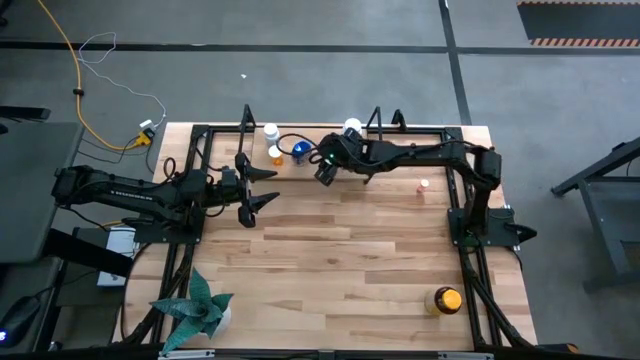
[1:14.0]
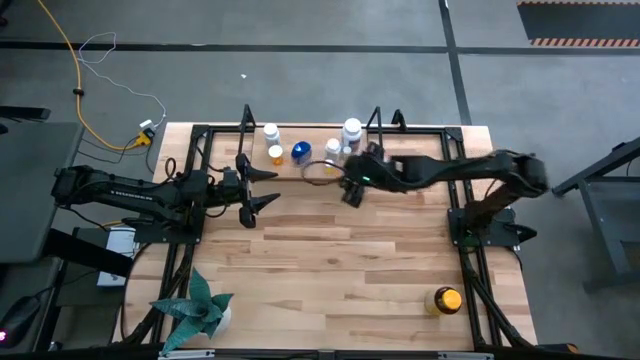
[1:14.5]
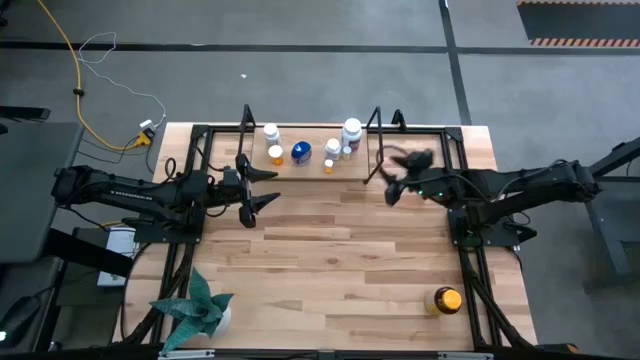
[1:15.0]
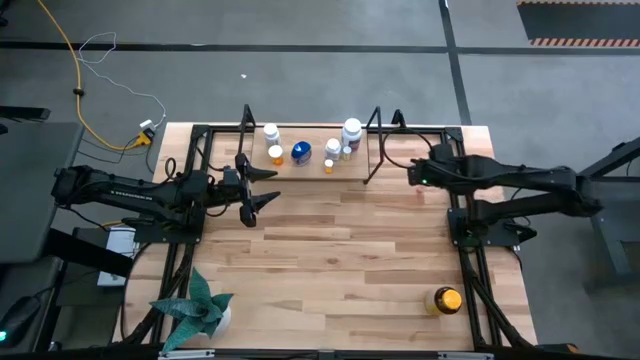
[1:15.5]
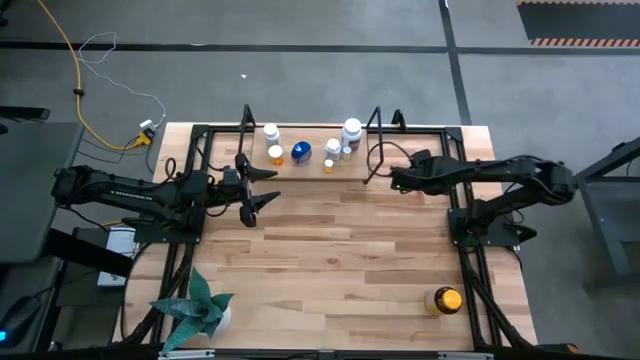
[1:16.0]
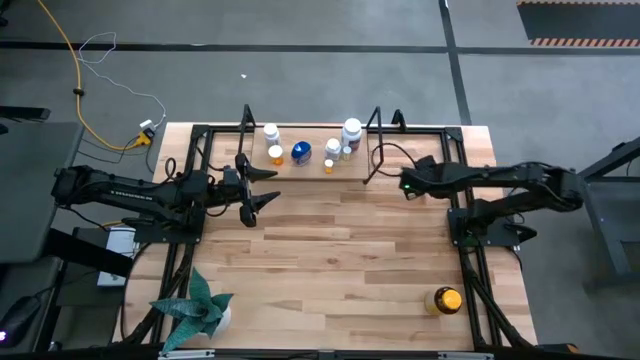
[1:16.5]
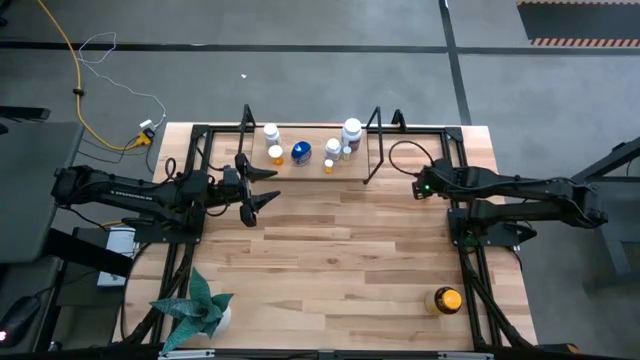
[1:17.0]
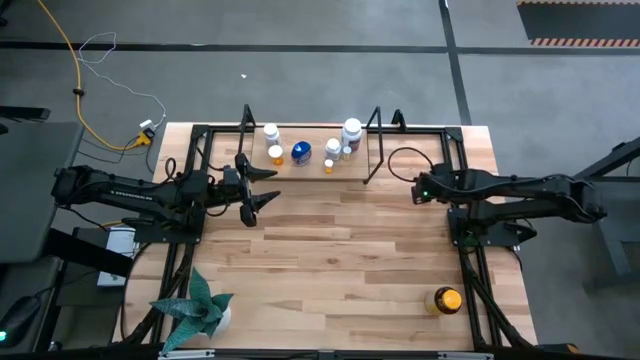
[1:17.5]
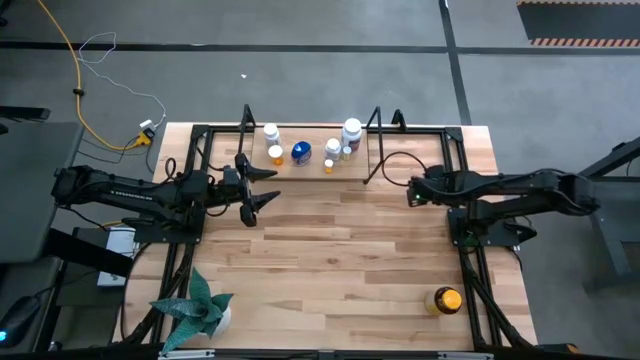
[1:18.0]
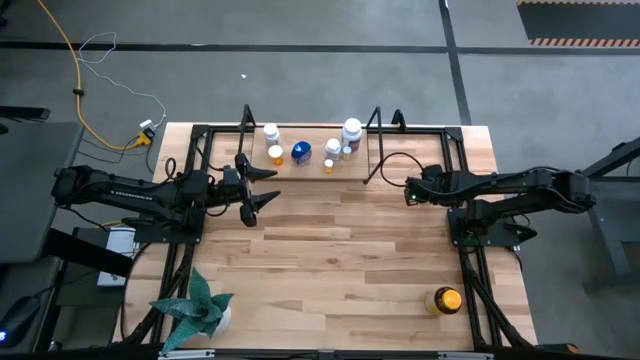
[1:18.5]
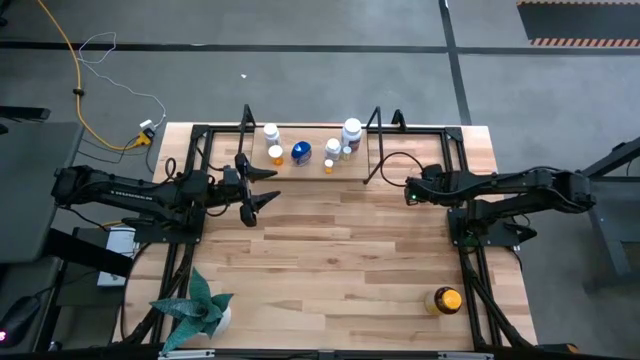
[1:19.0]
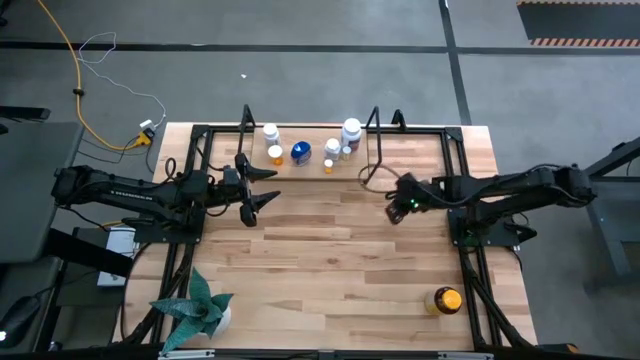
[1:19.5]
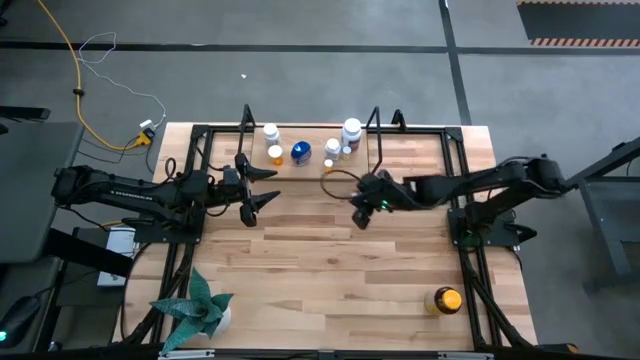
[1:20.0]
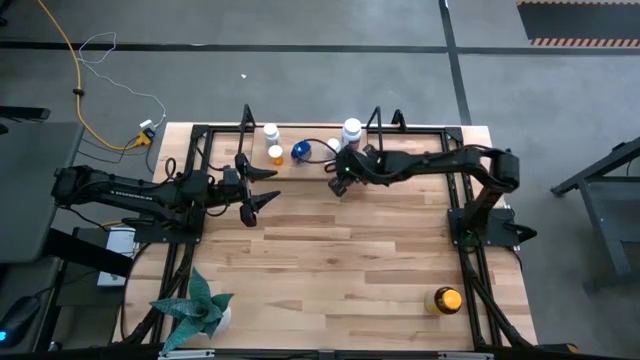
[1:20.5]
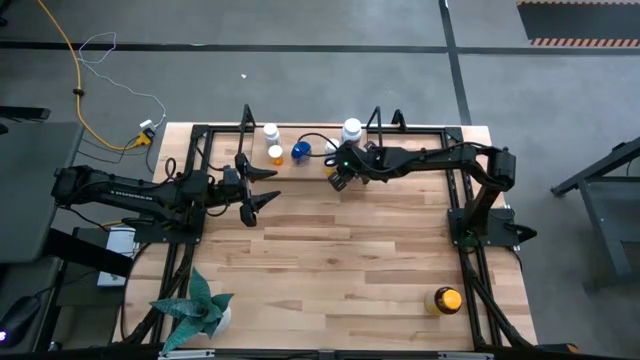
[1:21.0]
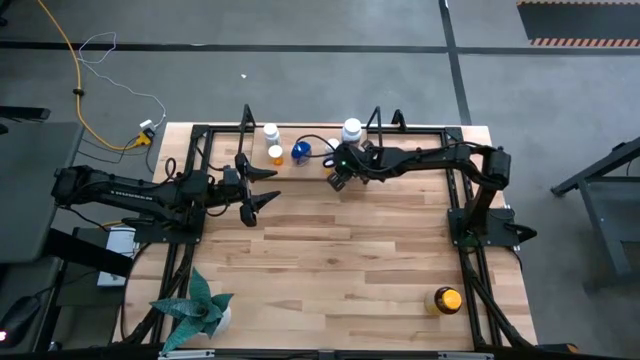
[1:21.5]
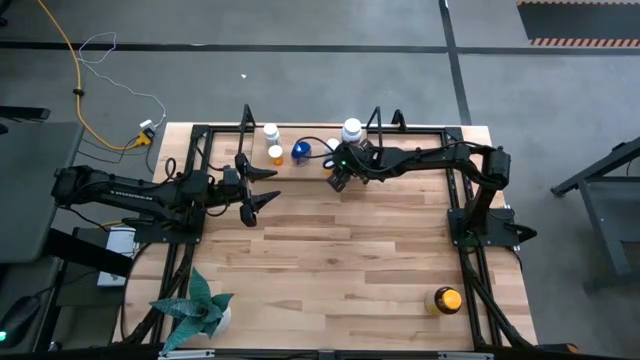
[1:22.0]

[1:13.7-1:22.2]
Task: Pick and place medicine bottles onto shelf by color
Put the pink pill bottle on the shelf

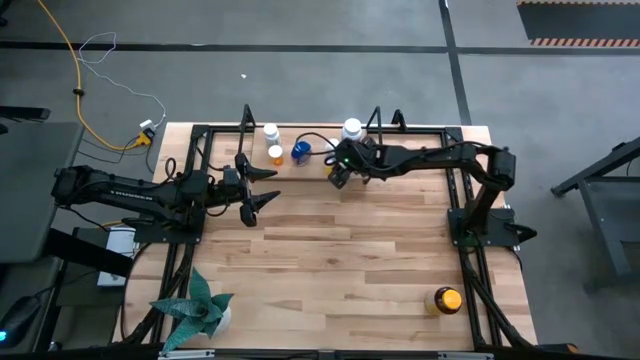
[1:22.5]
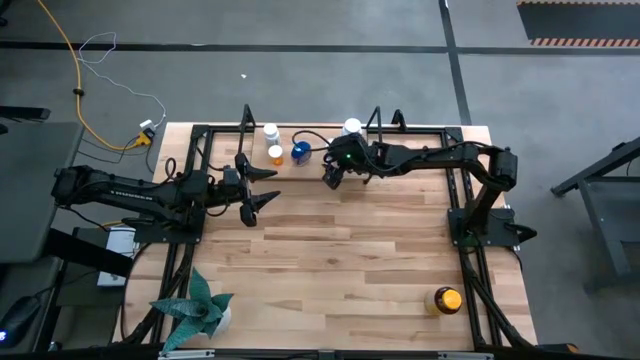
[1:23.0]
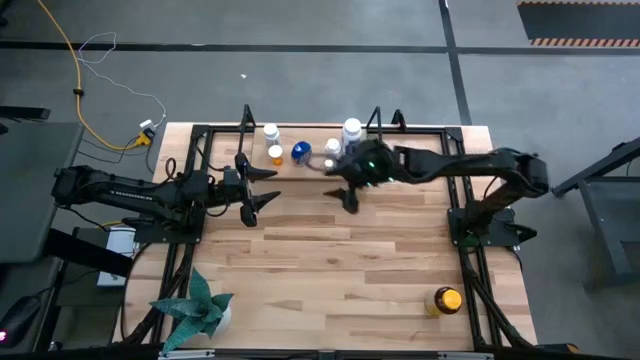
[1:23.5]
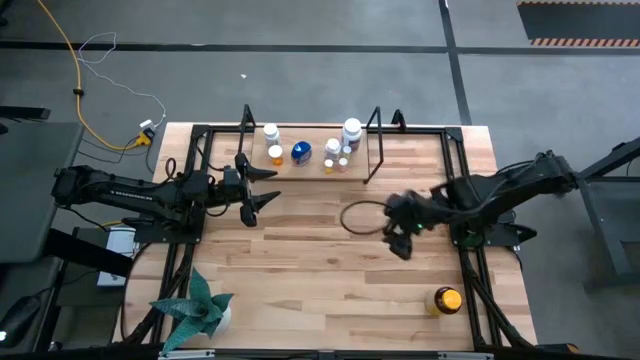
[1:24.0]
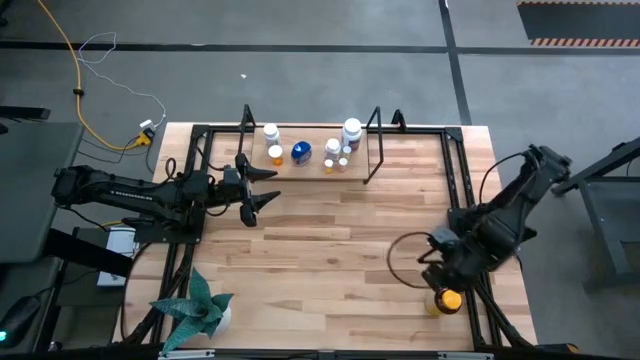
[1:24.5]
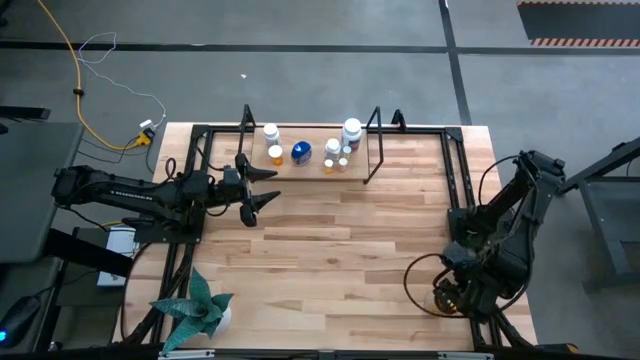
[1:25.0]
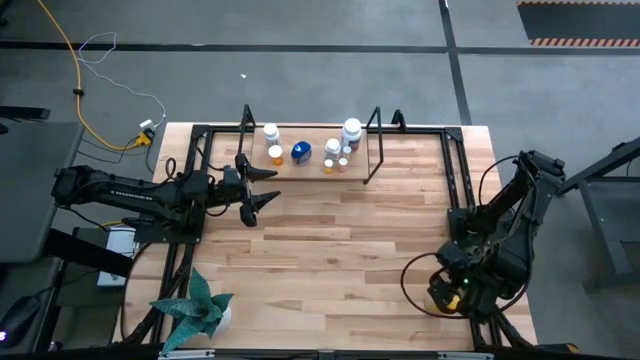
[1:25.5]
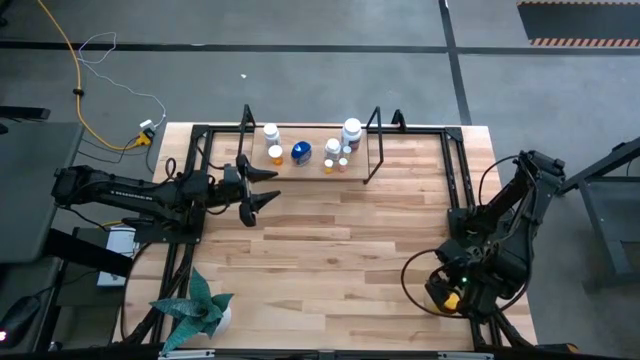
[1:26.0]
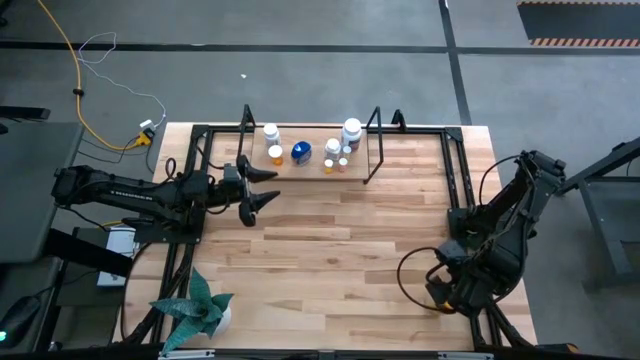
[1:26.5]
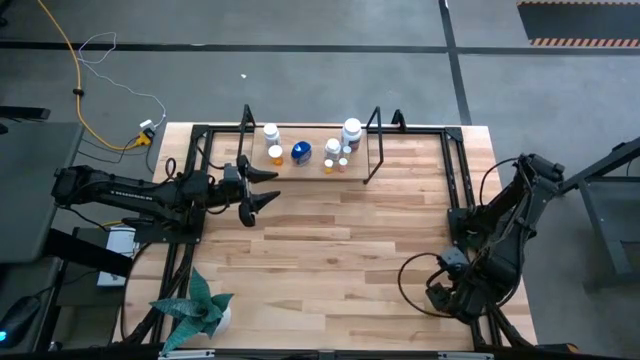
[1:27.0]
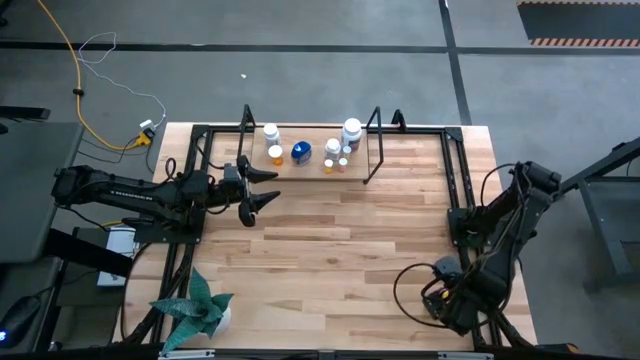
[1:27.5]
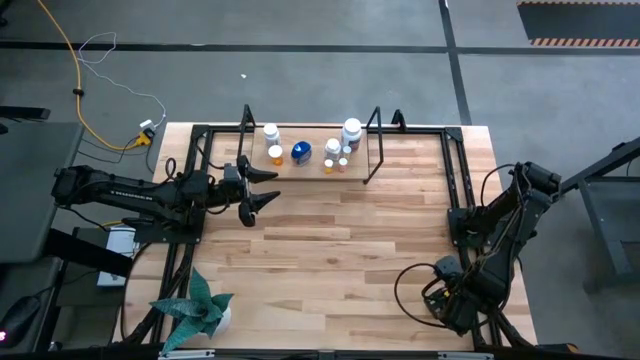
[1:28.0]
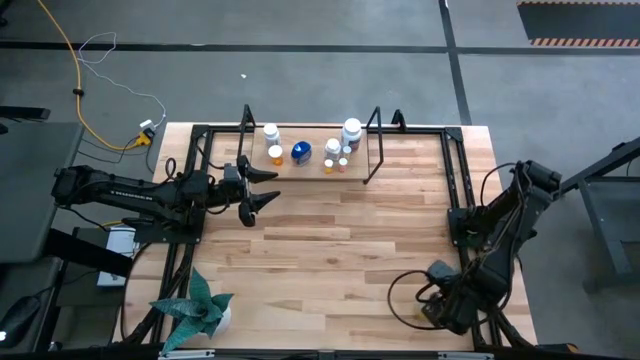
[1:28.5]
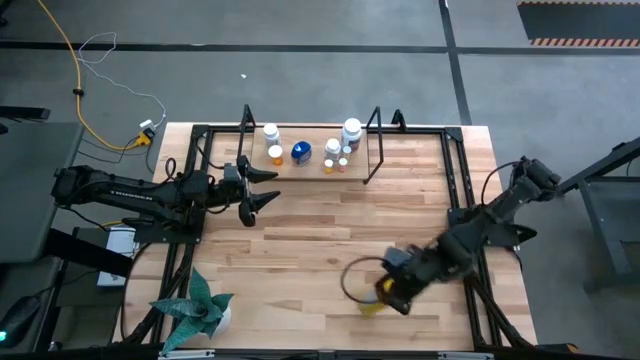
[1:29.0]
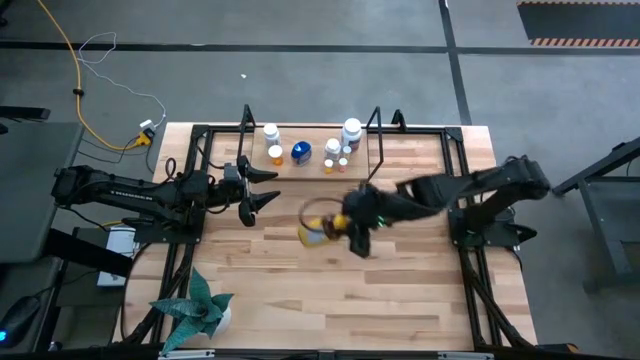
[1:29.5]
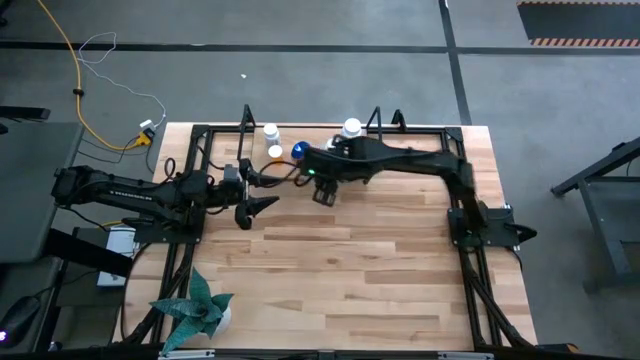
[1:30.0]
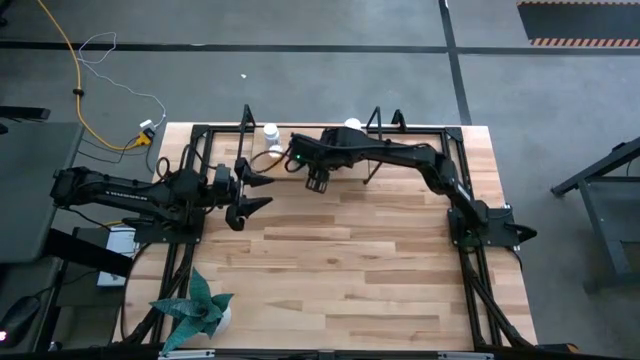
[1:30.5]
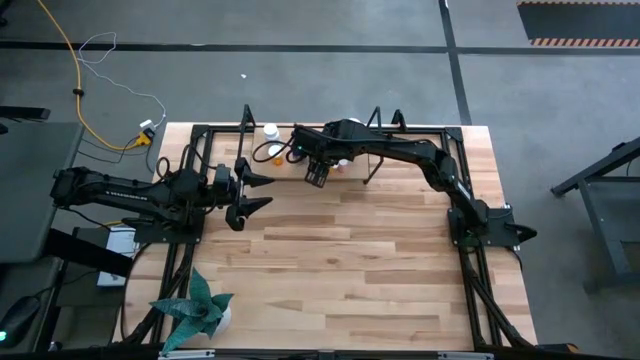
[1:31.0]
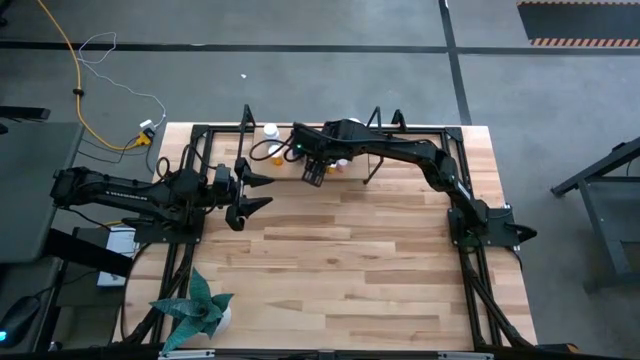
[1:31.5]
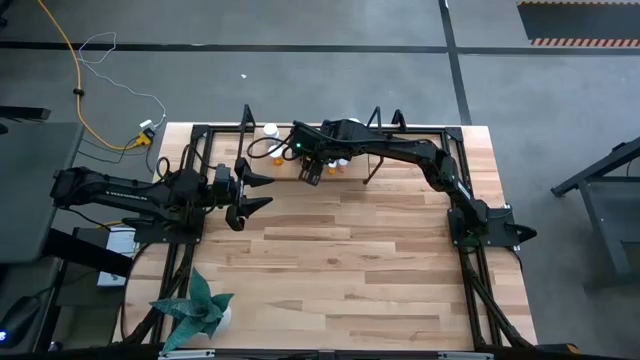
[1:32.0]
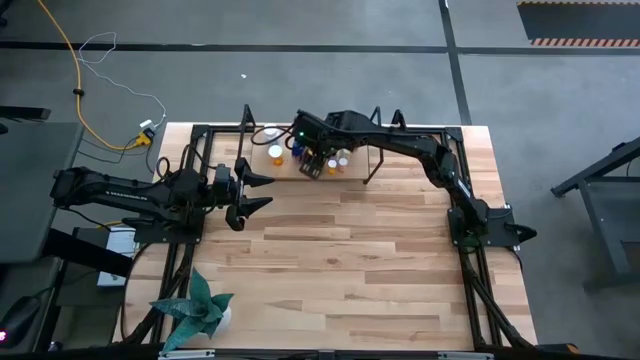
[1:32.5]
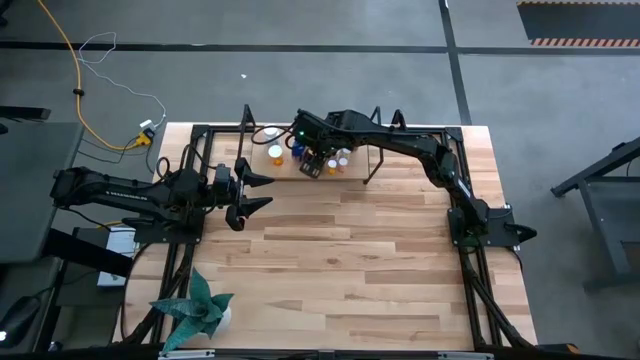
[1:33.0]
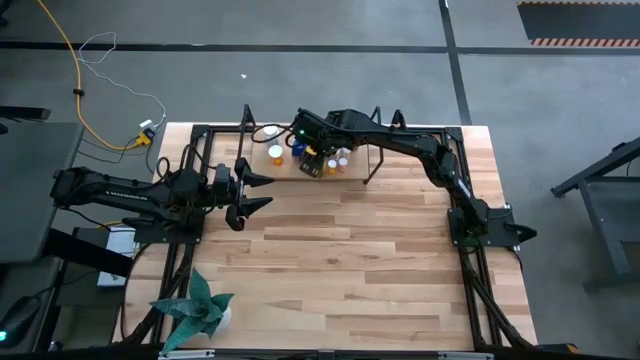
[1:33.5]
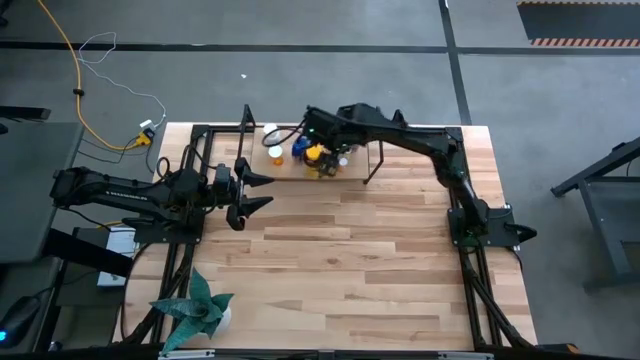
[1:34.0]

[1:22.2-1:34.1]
Put the large yellow pill bottle on the shelf
